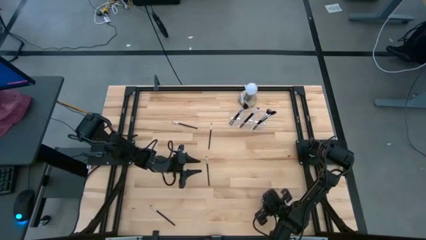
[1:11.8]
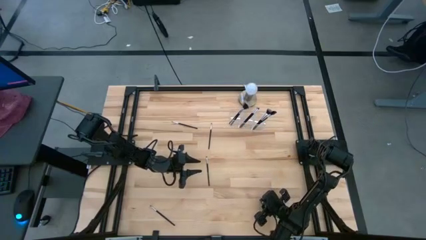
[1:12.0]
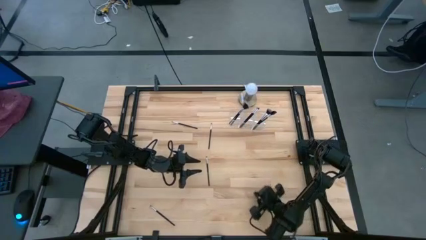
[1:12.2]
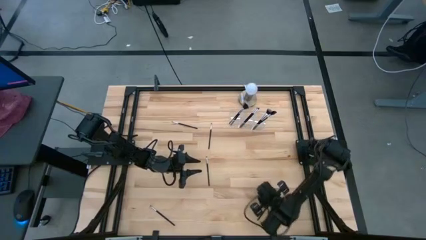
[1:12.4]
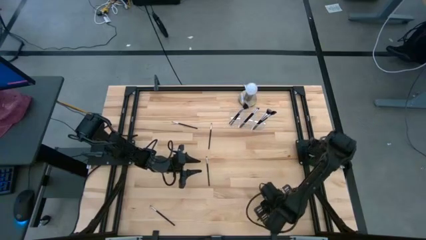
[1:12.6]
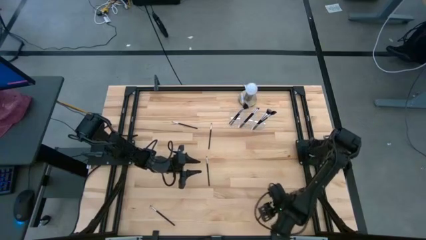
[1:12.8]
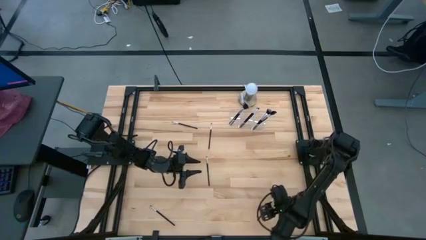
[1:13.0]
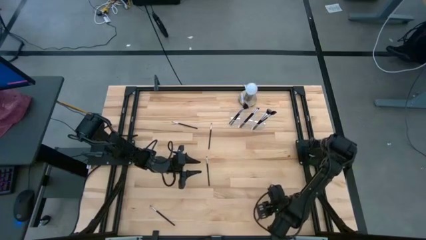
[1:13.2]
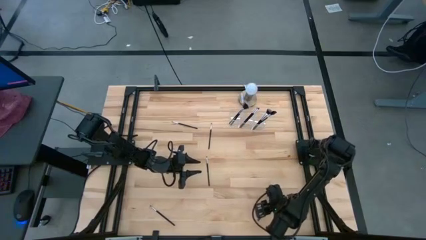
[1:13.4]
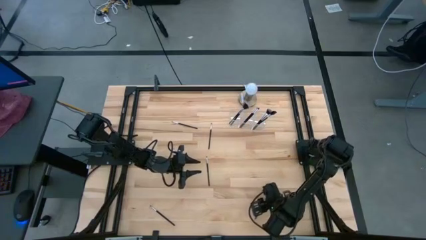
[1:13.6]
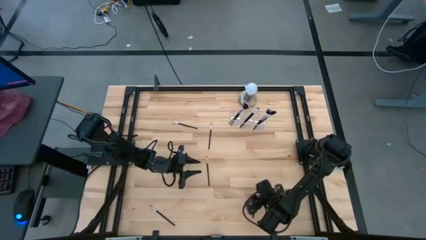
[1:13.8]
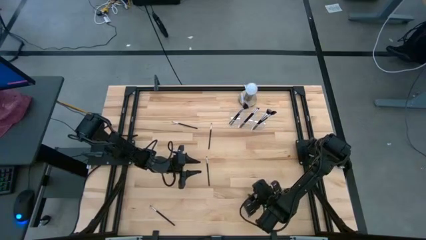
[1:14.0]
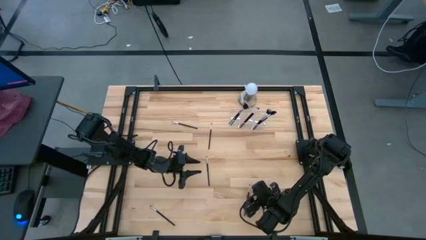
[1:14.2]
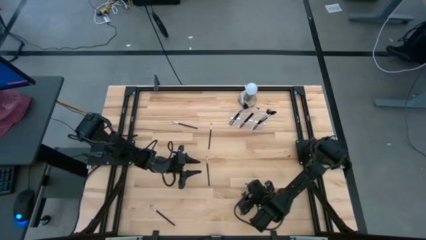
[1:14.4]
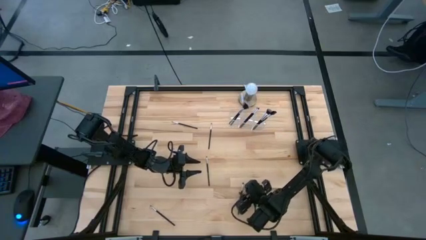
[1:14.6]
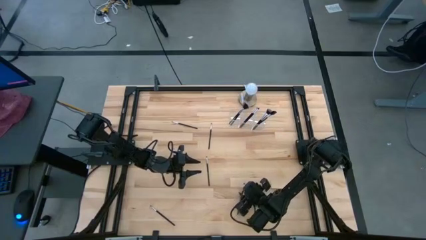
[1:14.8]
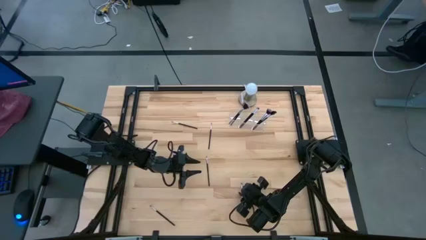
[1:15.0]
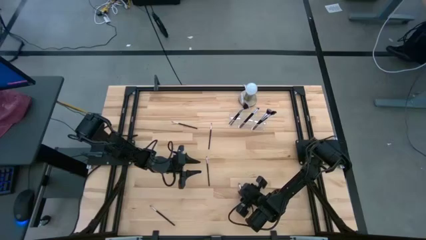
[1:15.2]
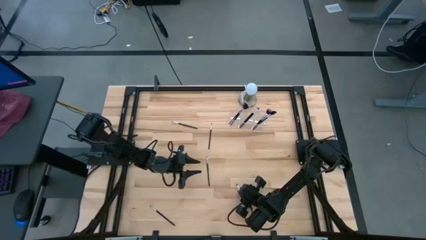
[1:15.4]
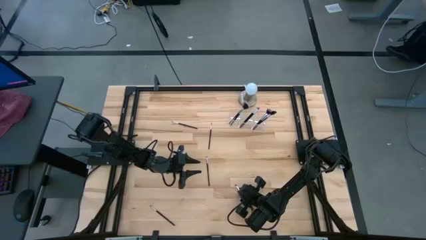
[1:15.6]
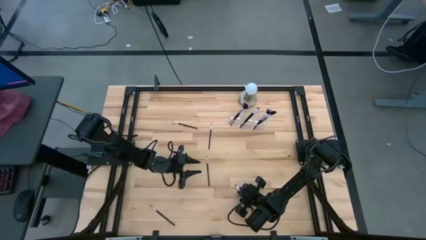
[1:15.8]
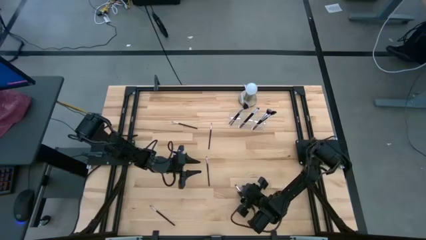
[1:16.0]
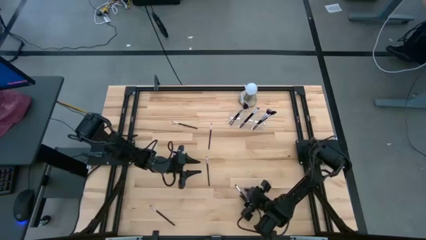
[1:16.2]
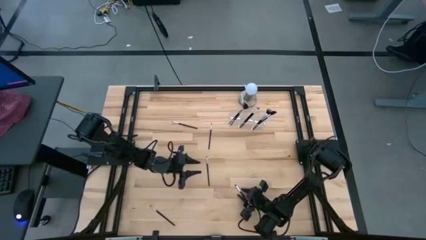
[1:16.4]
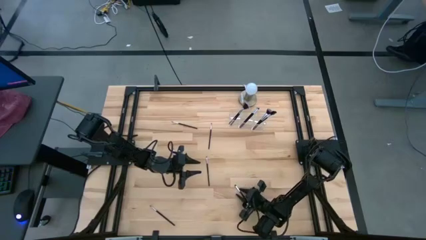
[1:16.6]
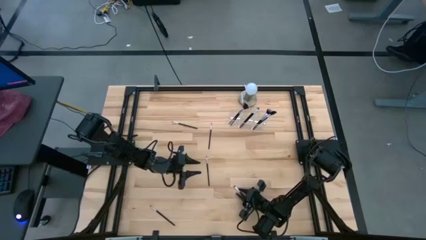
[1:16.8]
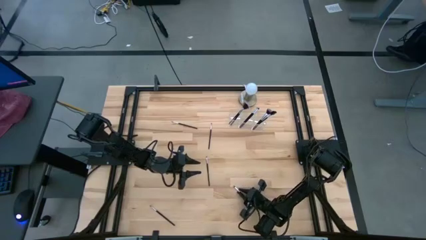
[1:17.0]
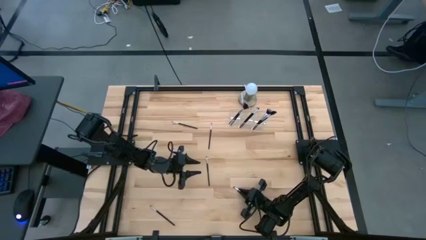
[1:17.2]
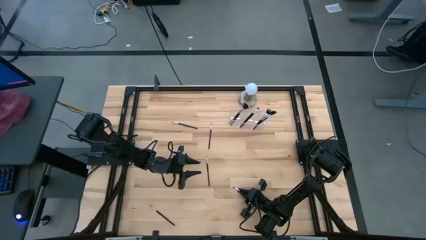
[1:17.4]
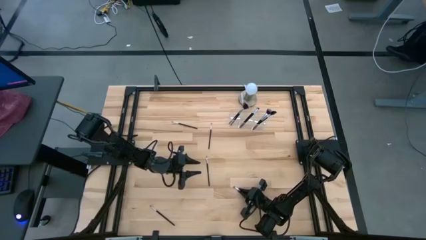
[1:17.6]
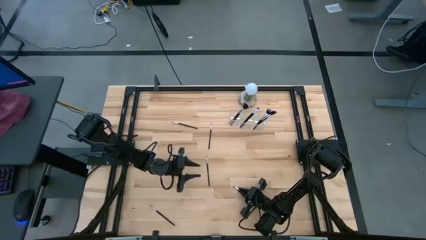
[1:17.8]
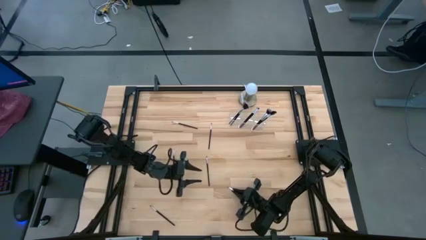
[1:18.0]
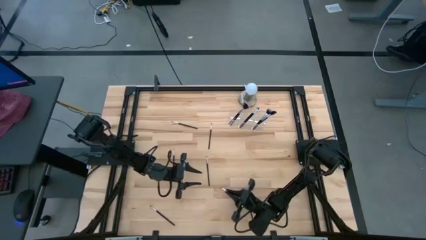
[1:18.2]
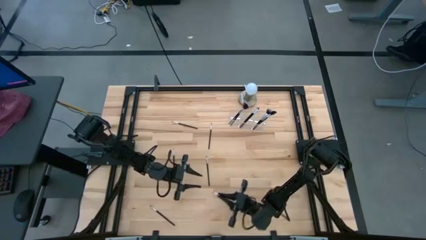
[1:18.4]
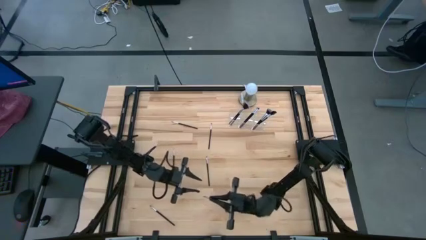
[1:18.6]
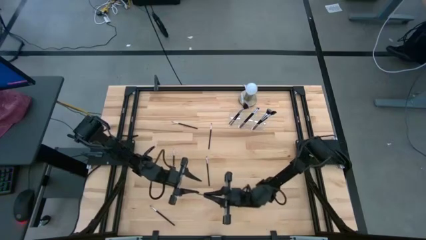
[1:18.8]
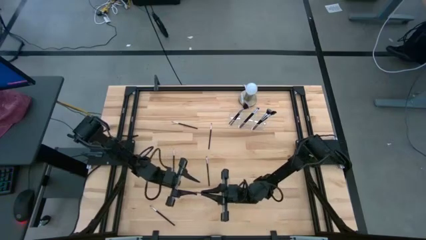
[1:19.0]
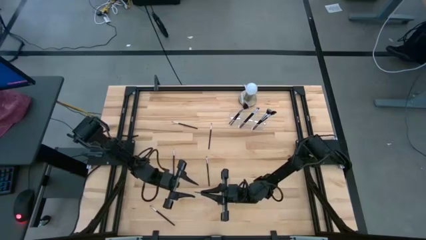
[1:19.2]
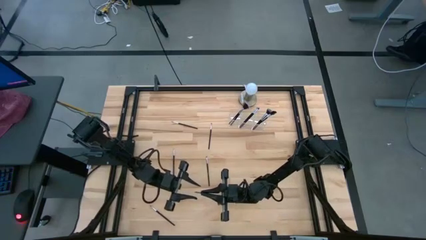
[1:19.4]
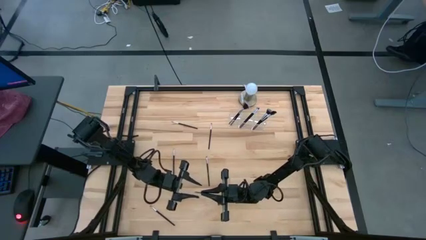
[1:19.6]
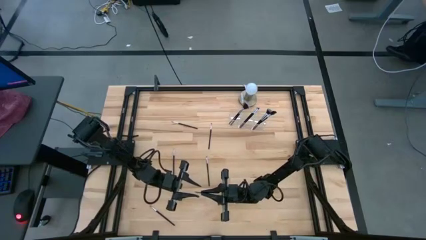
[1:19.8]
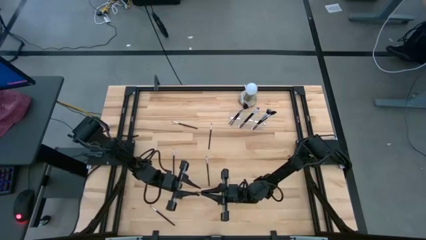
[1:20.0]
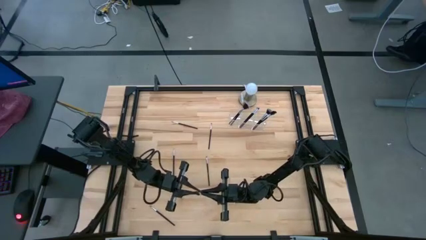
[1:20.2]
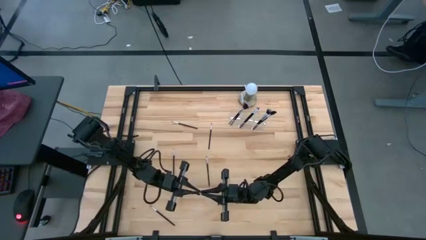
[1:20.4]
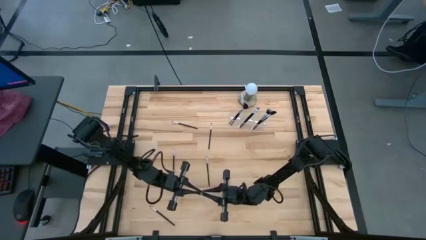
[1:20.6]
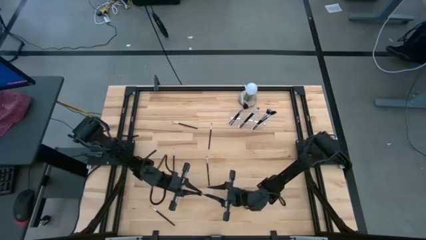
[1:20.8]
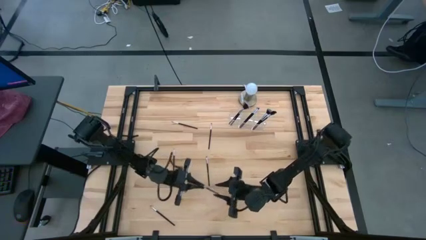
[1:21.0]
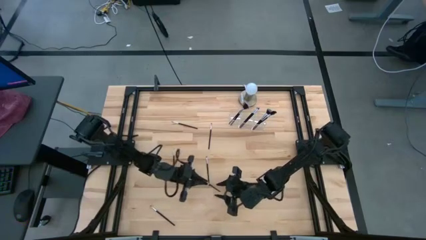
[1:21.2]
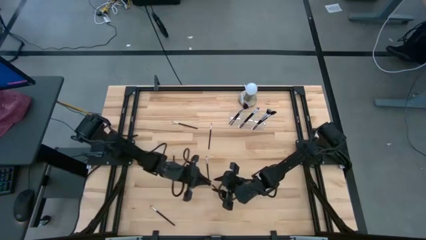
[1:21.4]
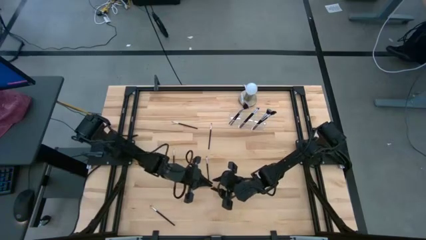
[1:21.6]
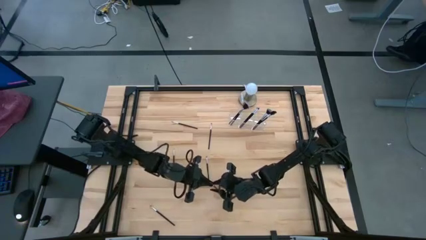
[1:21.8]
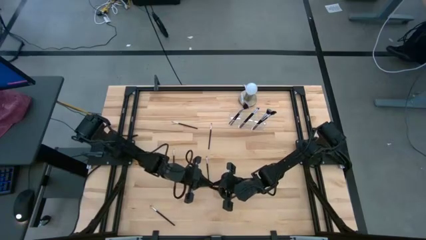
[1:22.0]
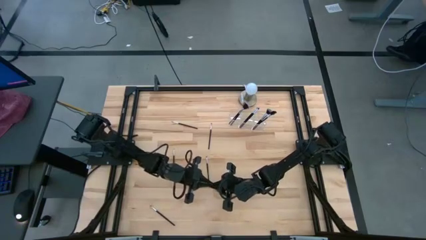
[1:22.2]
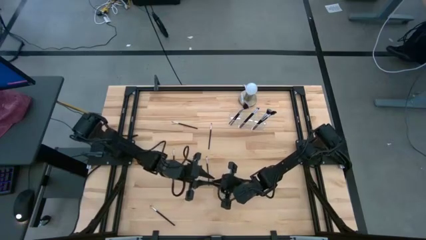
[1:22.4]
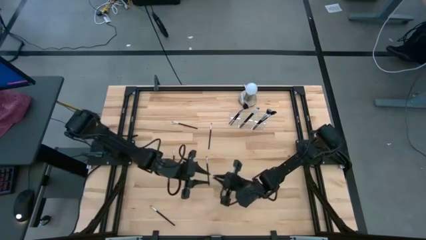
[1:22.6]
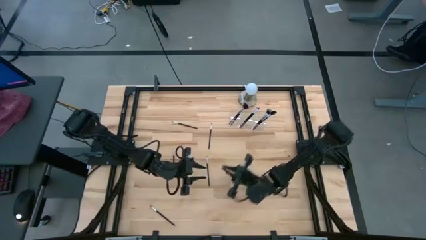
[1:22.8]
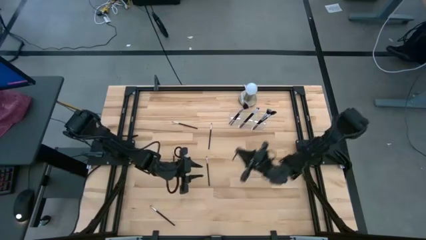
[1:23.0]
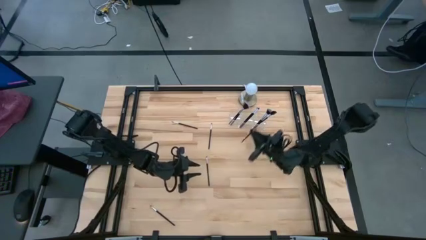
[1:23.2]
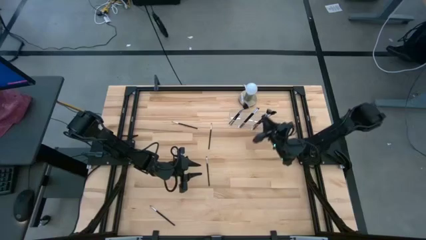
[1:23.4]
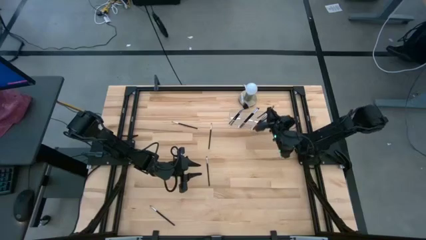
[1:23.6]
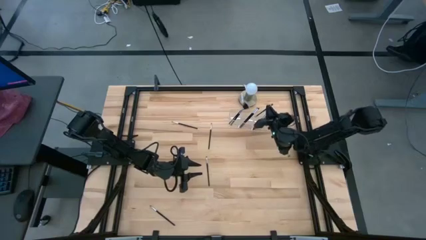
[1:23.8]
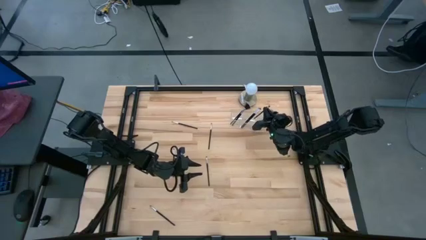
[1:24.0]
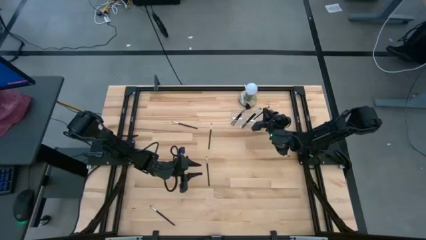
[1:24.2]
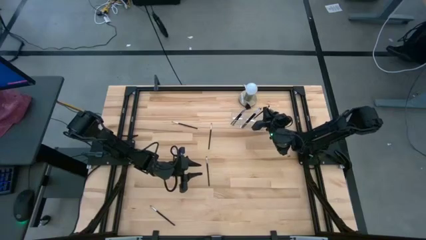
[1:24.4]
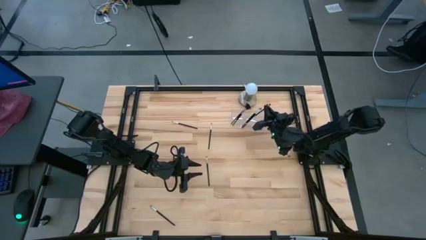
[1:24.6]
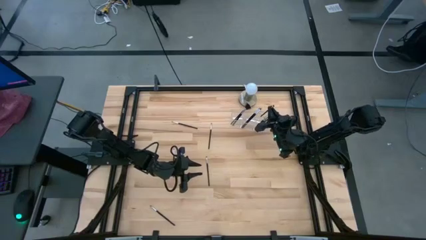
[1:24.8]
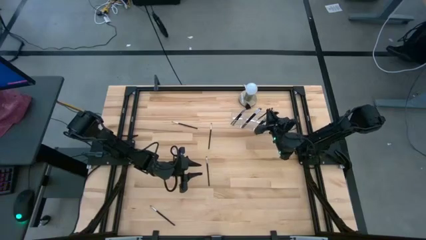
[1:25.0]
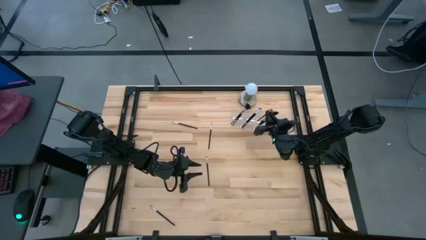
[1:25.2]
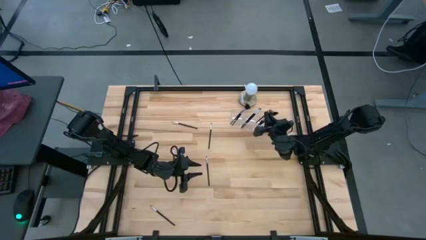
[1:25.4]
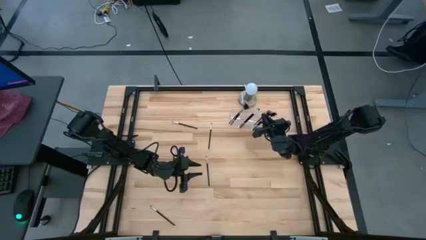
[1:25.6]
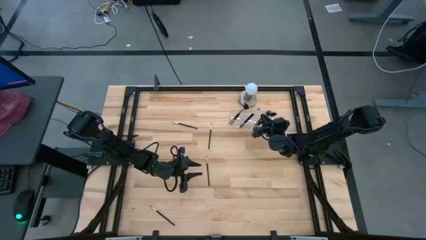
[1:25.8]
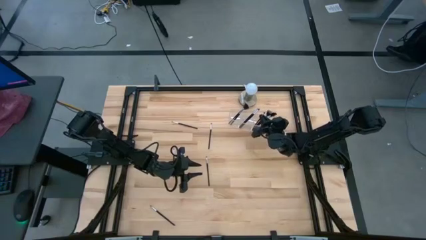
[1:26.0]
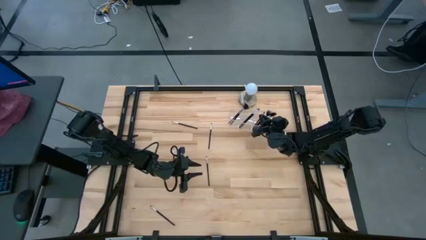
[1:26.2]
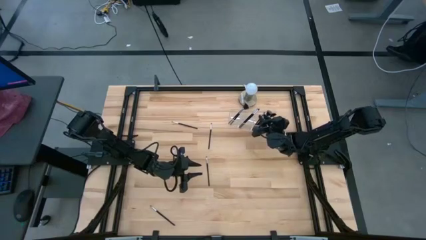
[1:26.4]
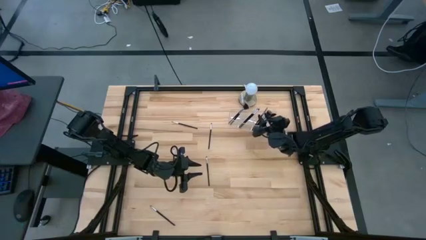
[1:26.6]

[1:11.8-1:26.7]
Task: Put items in baskets/containers
Put the eyeshadow brush into the transparent organizer

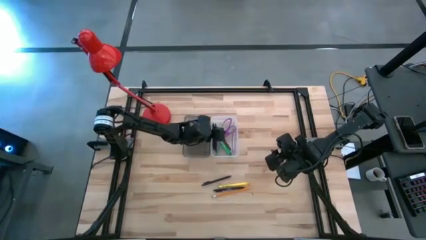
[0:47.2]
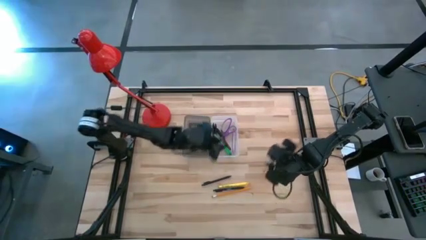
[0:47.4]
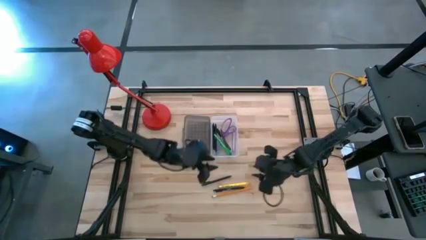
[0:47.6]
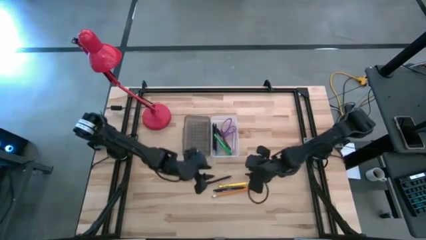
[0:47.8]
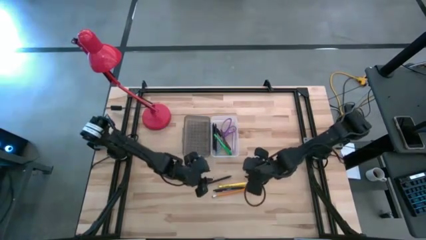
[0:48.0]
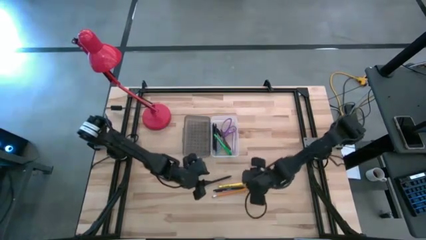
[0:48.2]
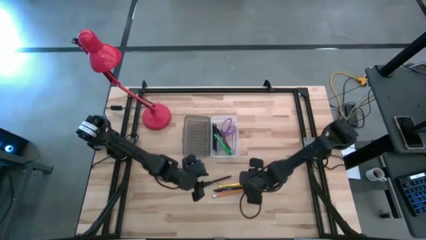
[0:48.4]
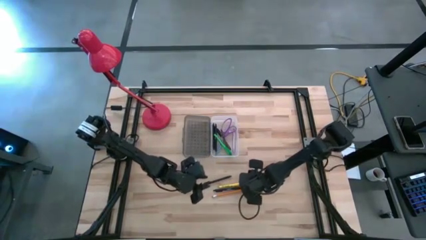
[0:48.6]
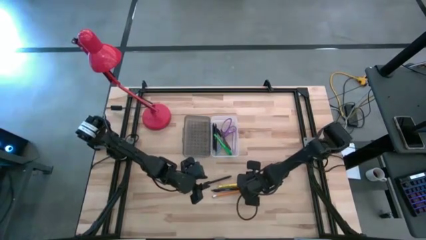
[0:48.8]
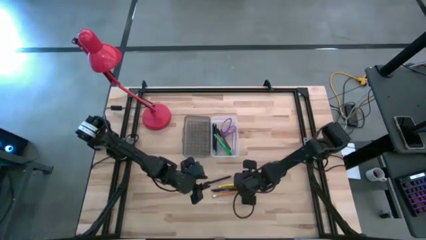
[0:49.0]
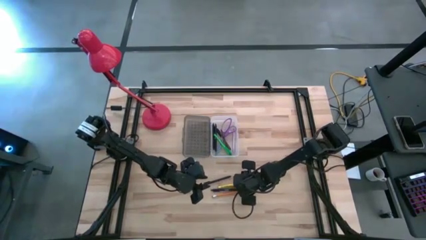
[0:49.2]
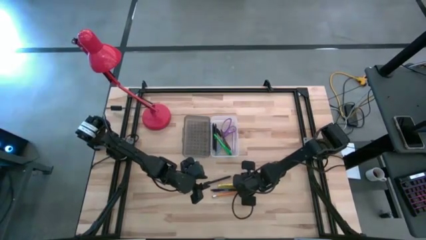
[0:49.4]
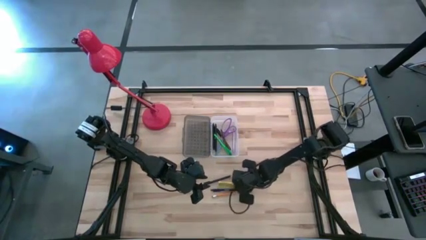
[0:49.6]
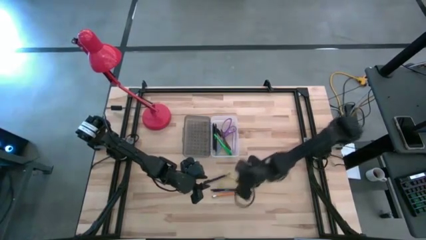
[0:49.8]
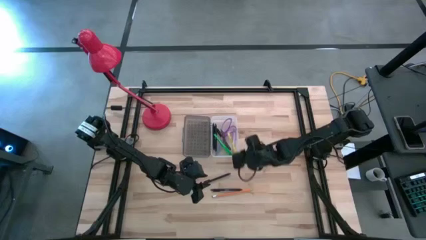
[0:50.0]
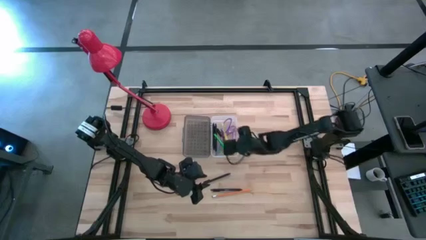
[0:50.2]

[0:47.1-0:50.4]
Task: Pick & place school supplies into a supply box
Put the yellow pen into the supply box
